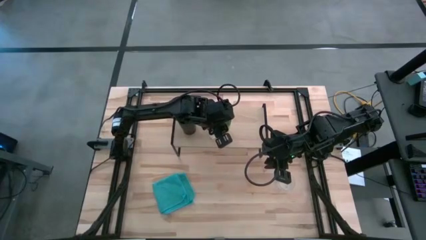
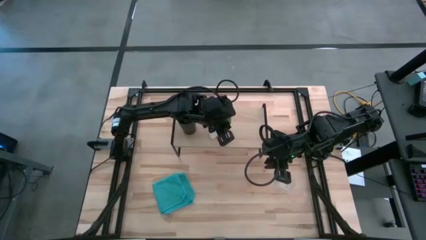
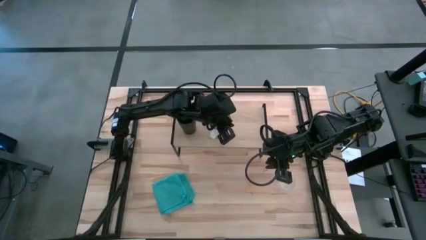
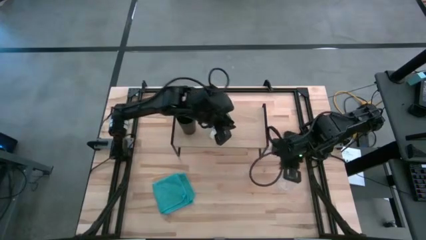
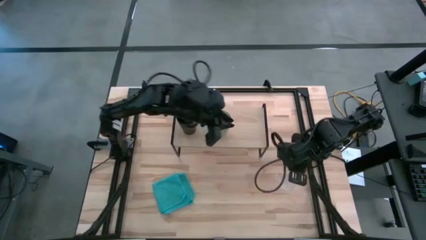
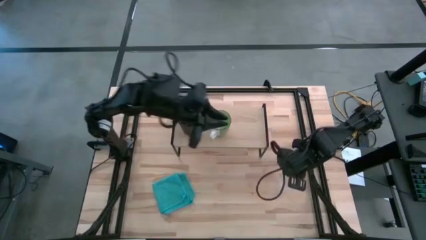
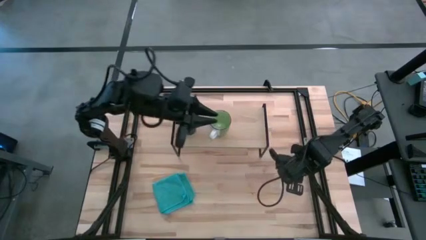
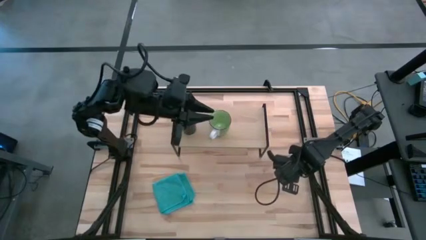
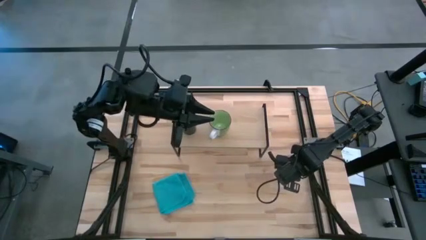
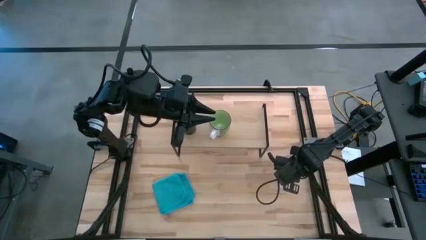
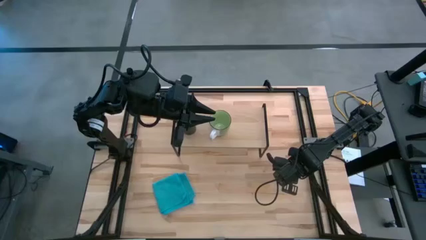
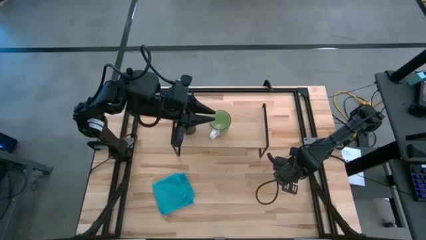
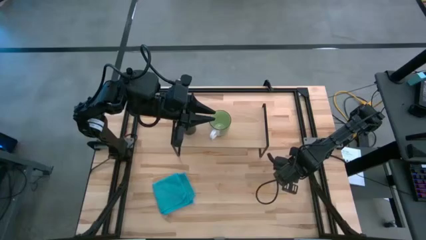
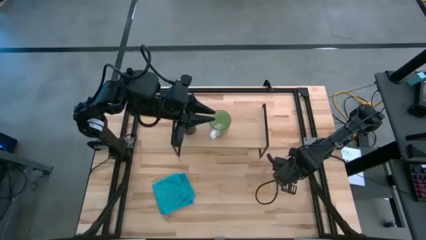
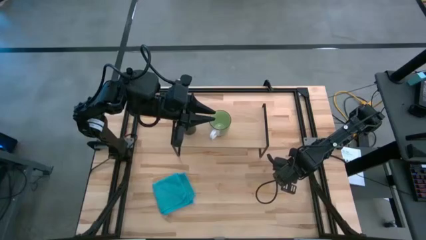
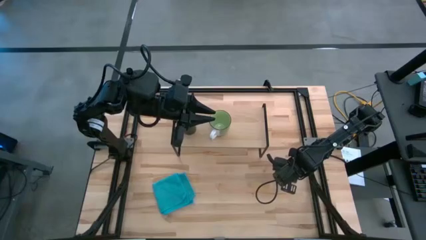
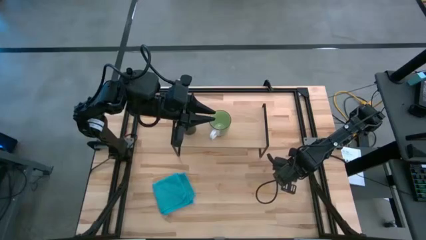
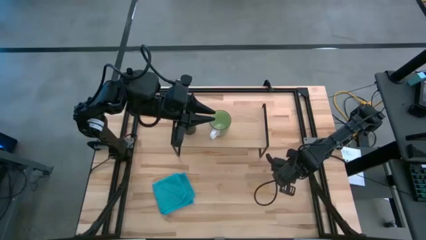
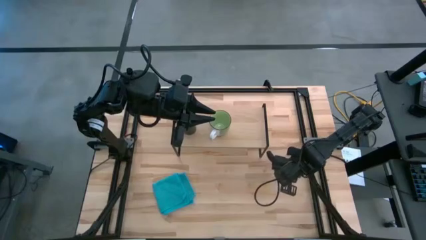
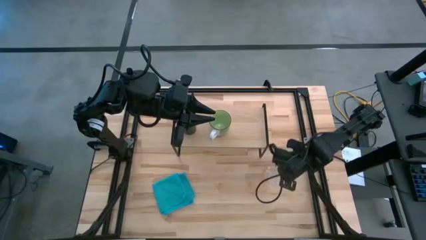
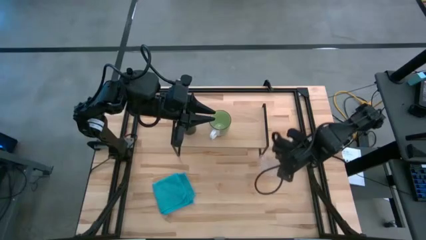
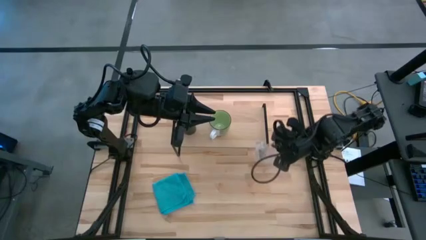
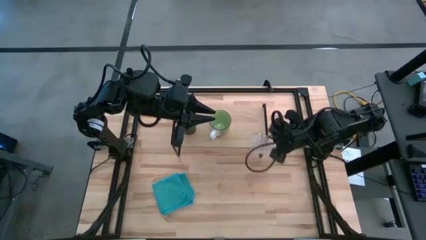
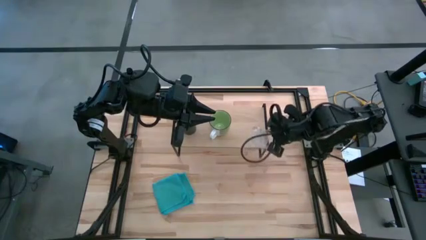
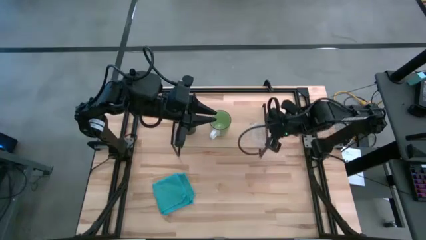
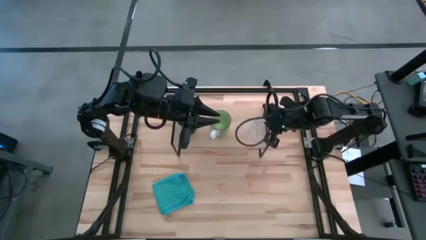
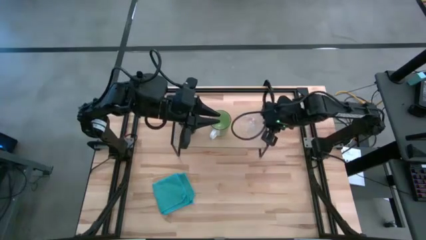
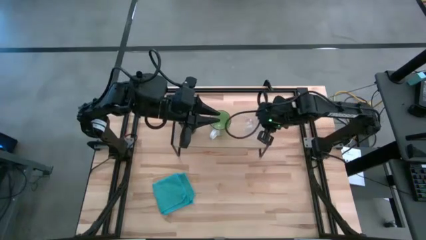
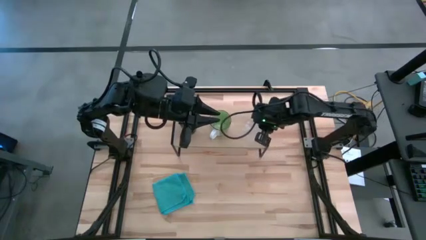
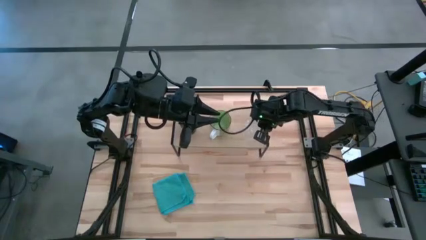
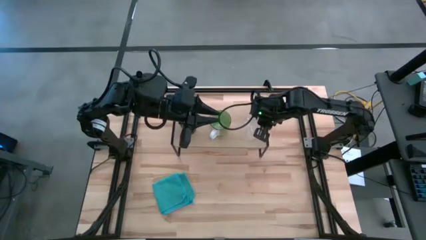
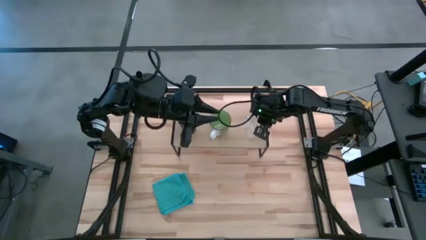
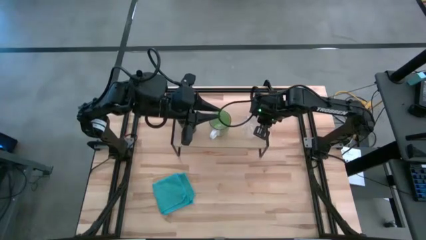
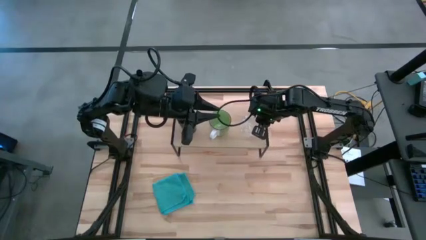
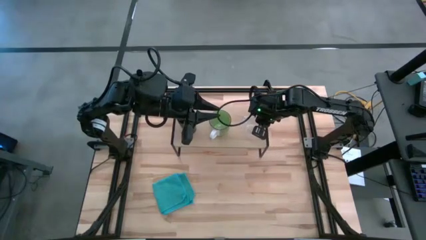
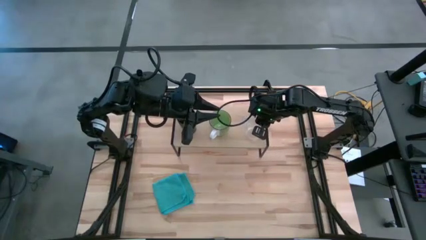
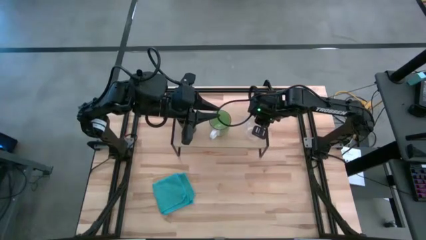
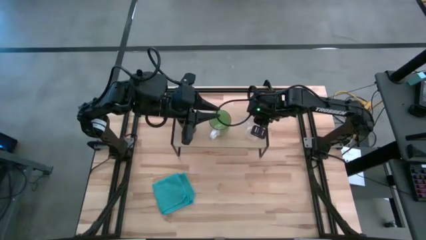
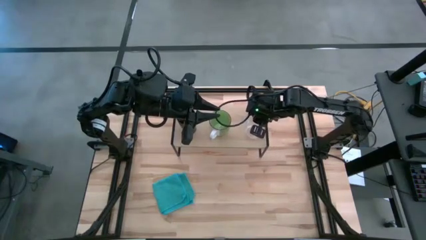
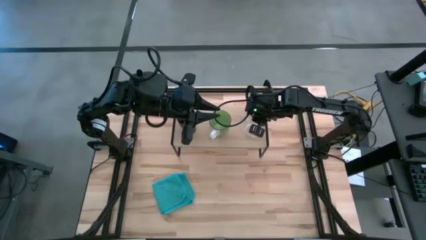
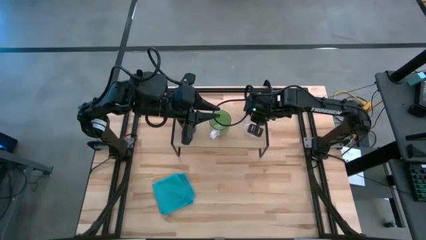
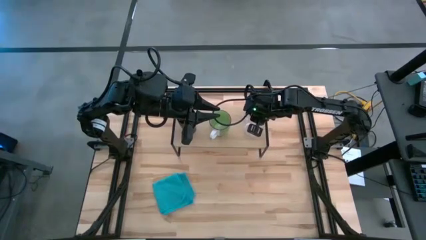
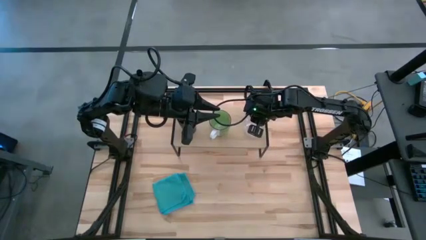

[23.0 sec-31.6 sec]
Task: Stack small to large cups/mugs on shelf
Put the transparent mug on the shelf

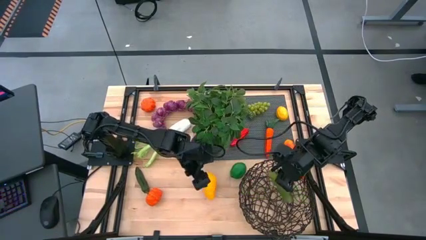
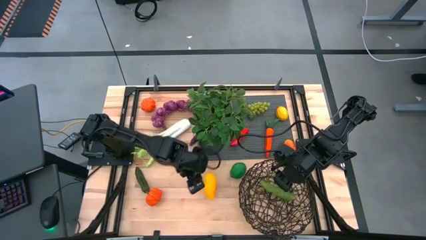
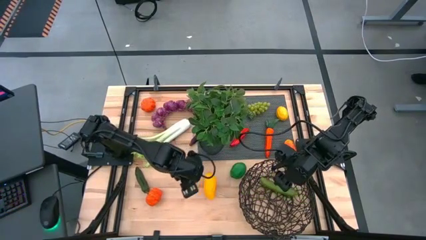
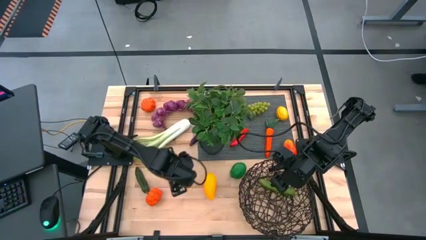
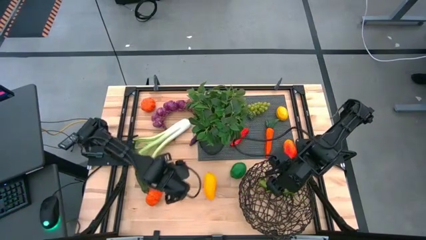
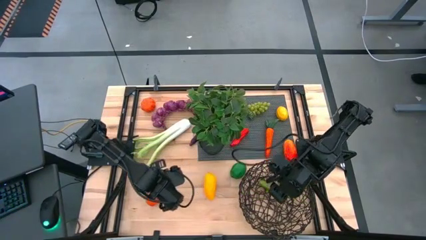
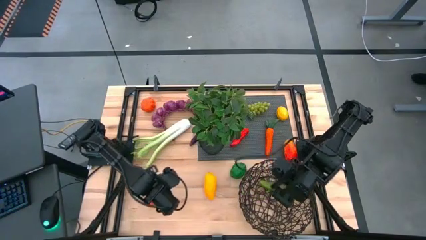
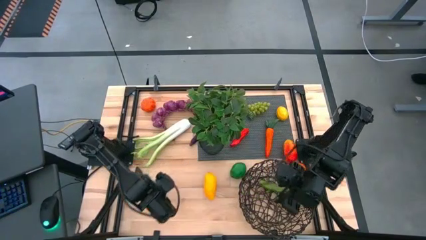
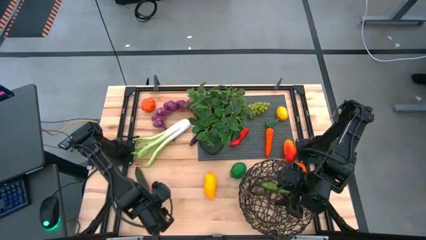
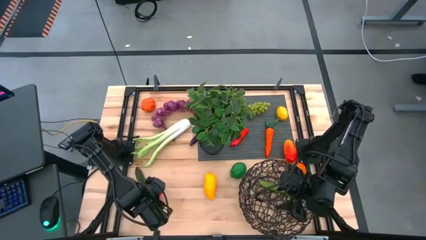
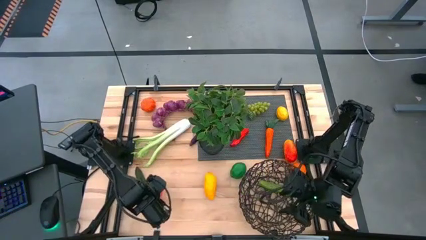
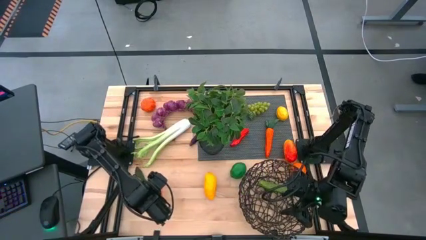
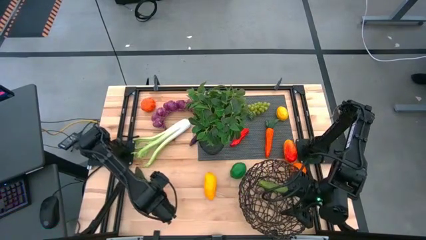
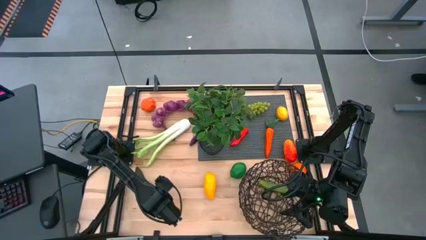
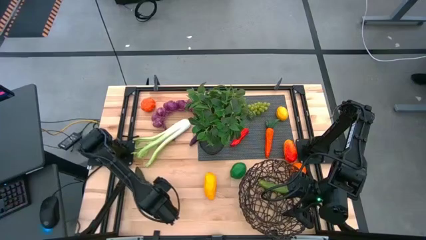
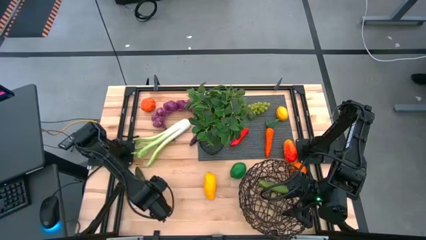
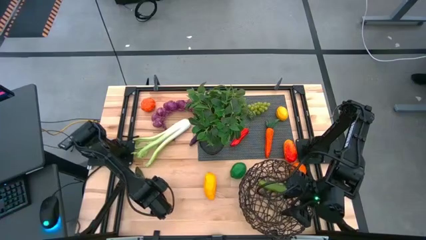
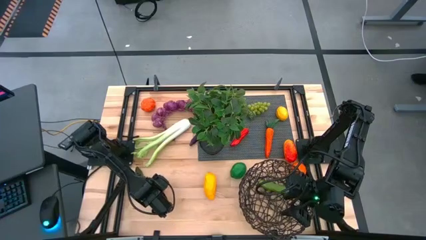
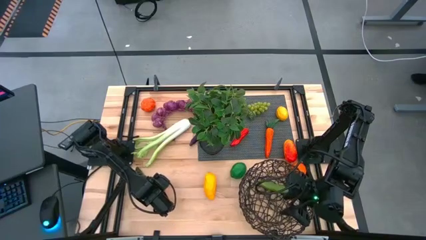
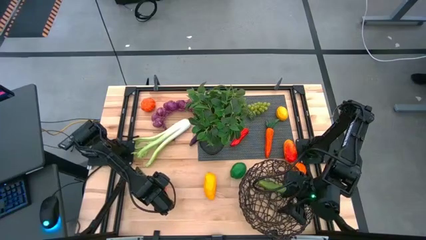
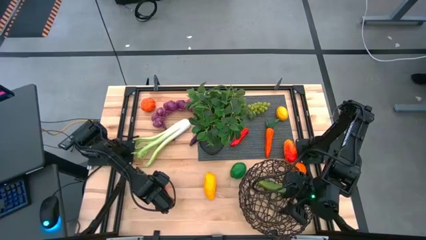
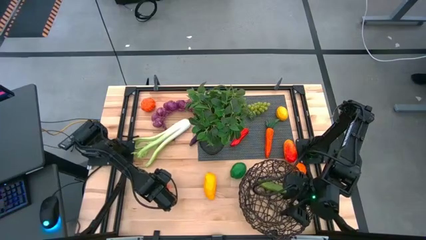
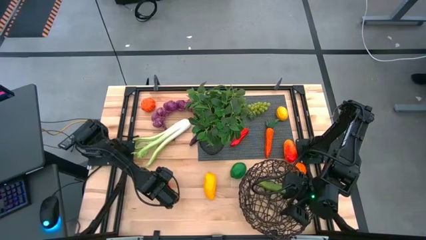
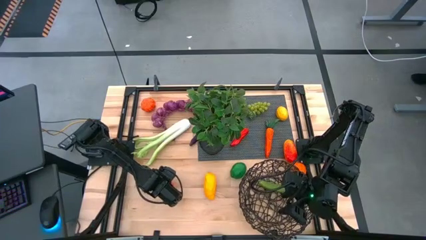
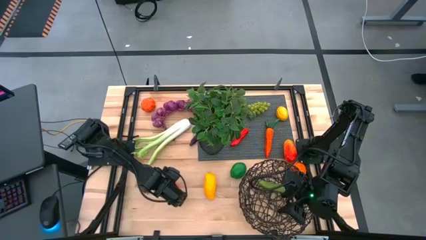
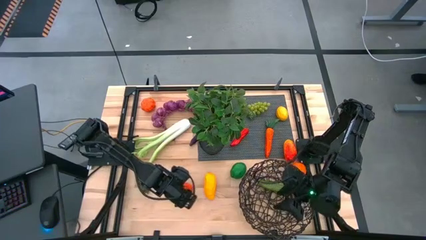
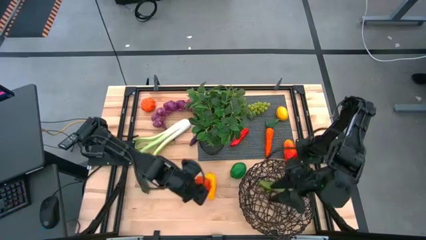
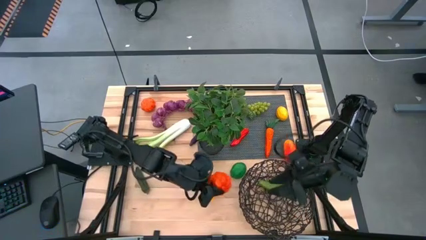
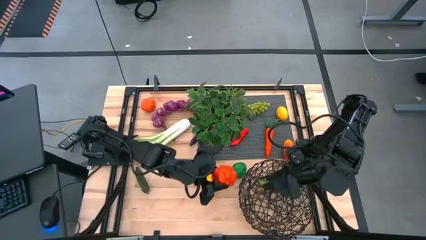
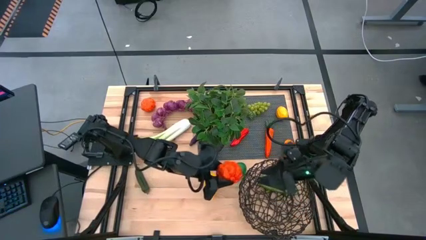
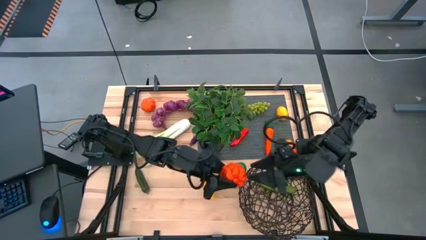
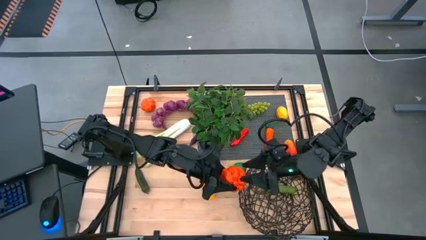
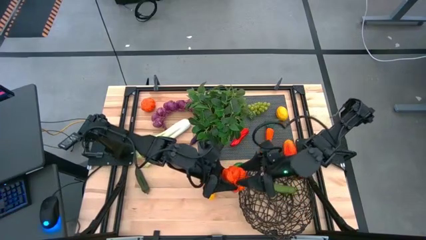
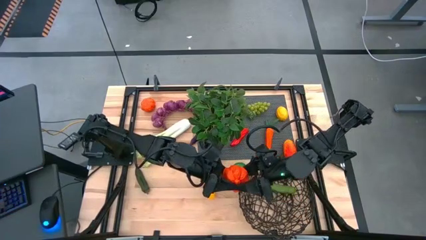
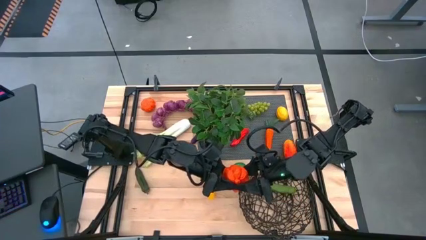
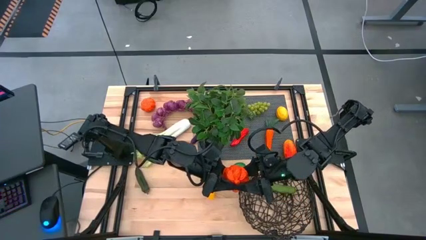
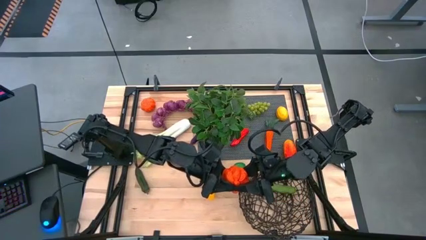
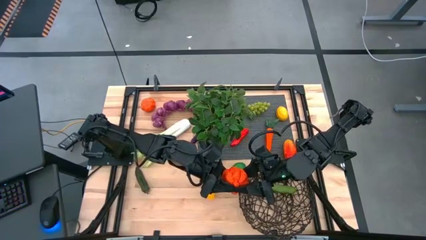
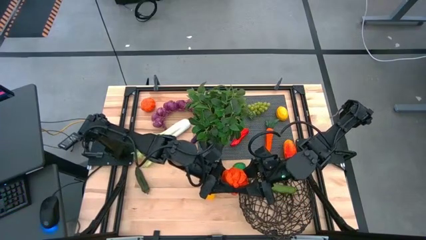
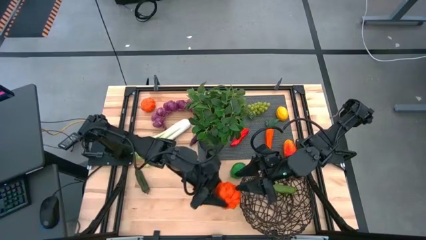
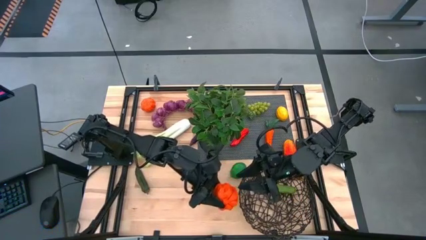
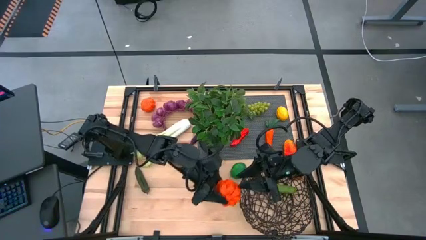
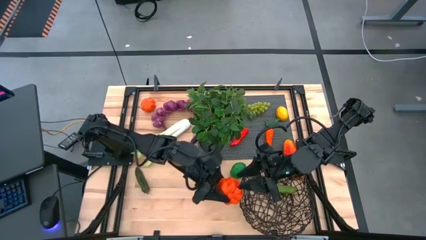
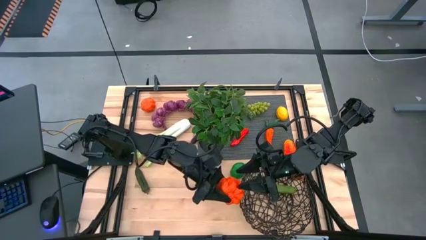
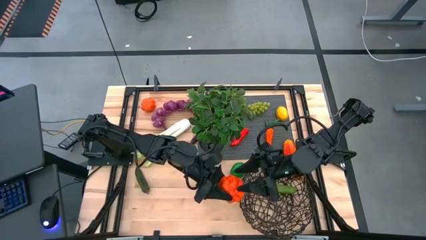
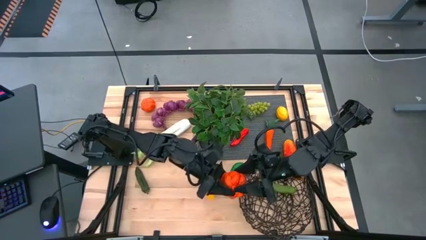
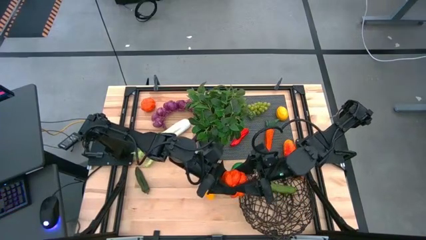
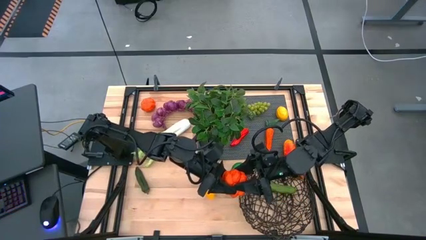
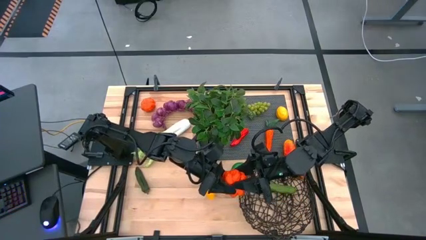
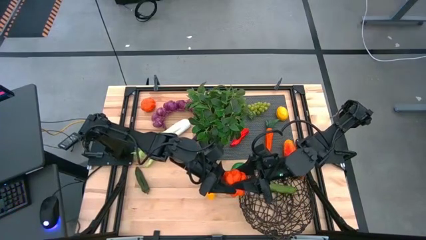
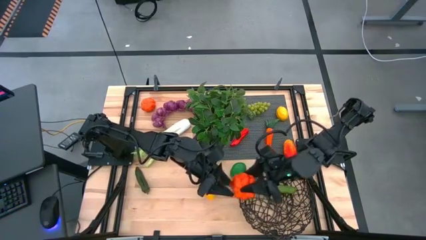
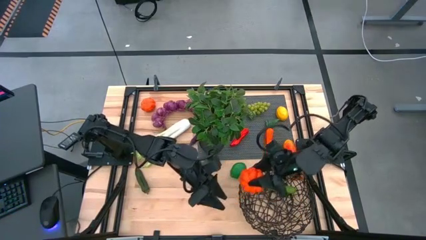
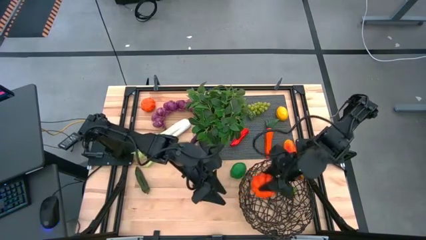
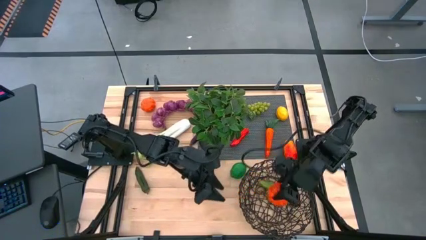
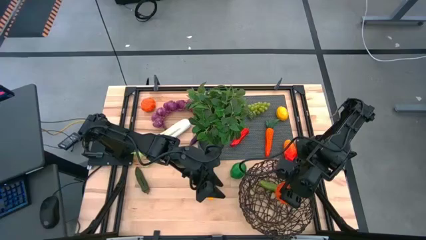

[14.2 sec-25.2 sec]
Task: Build produce basket
Put the bottom orange squash into the brown wire basket
